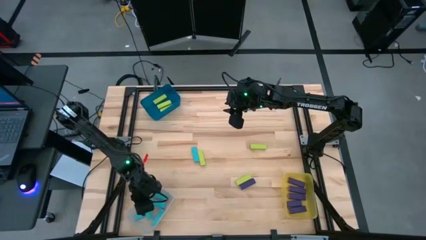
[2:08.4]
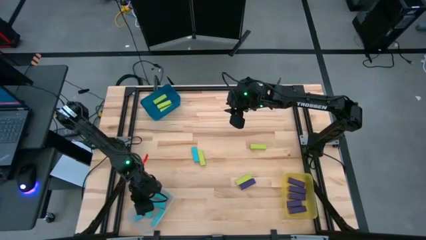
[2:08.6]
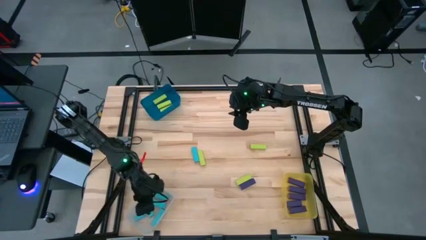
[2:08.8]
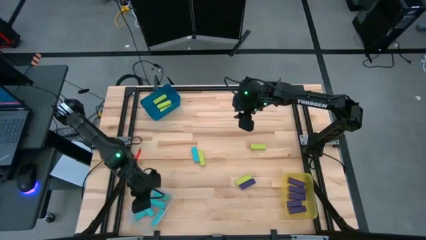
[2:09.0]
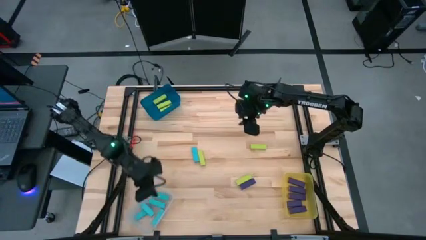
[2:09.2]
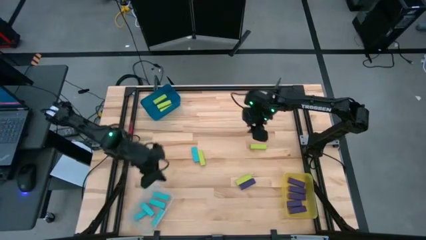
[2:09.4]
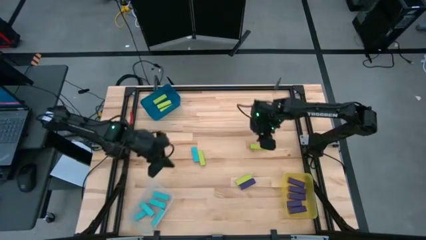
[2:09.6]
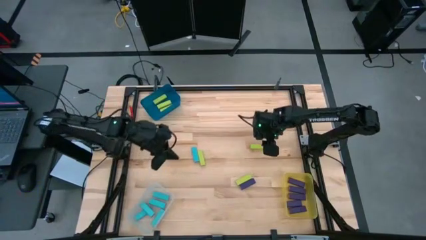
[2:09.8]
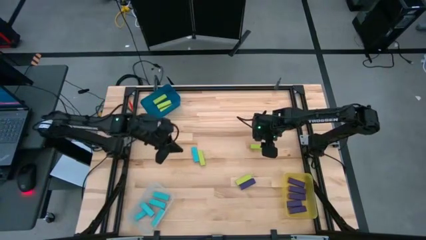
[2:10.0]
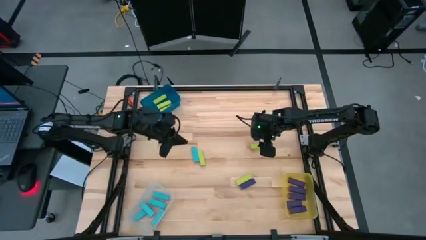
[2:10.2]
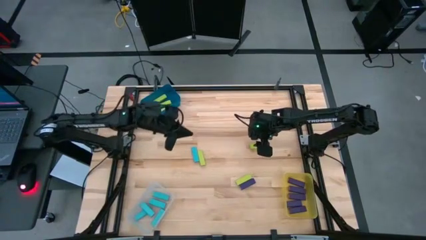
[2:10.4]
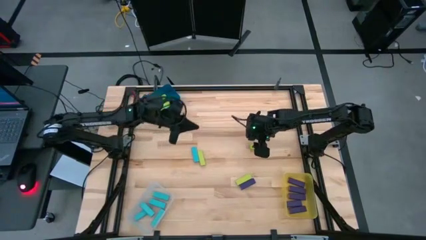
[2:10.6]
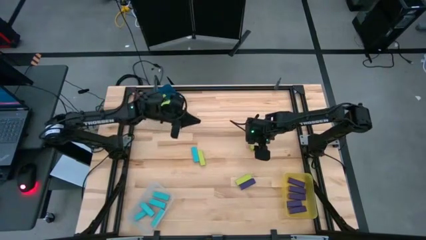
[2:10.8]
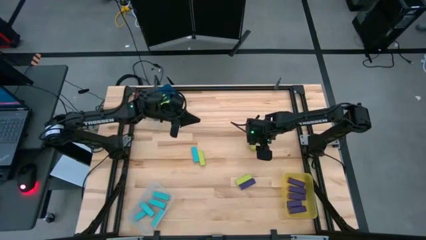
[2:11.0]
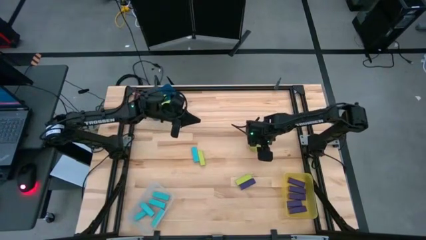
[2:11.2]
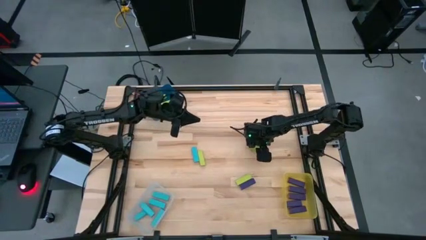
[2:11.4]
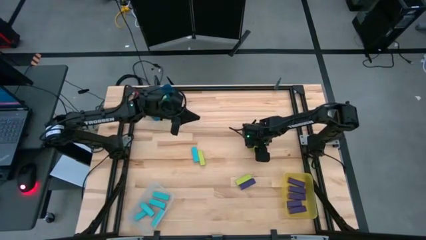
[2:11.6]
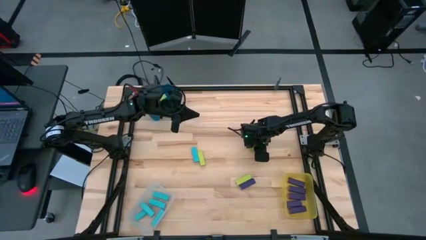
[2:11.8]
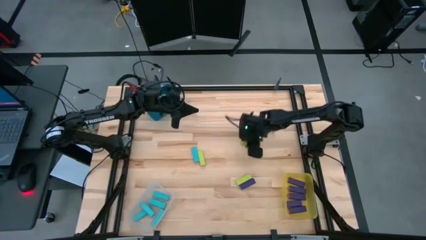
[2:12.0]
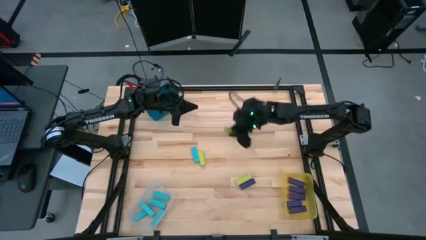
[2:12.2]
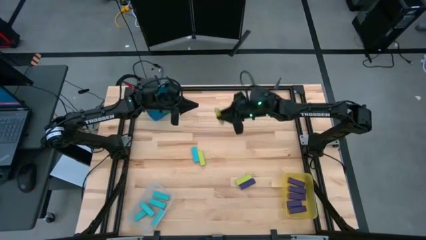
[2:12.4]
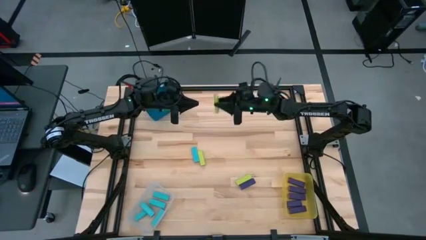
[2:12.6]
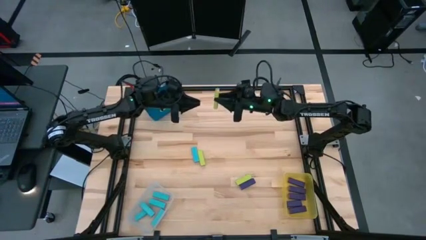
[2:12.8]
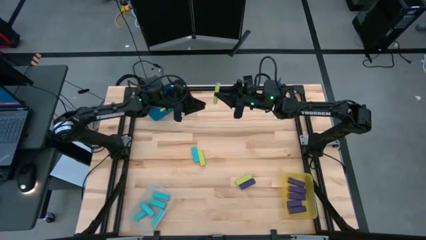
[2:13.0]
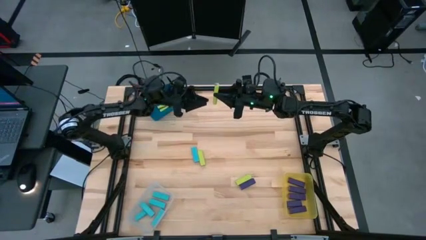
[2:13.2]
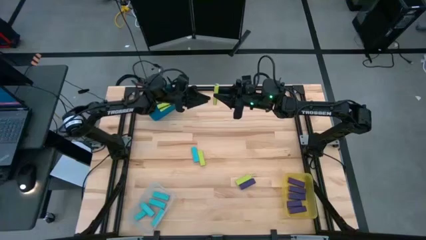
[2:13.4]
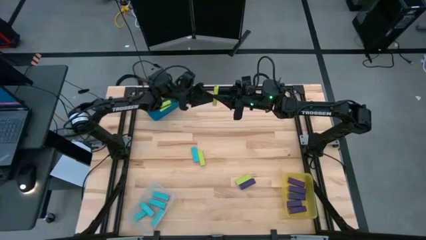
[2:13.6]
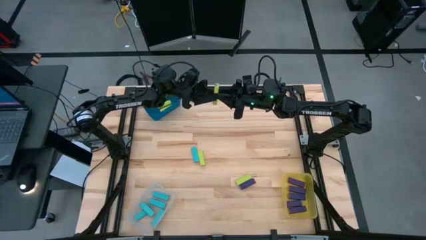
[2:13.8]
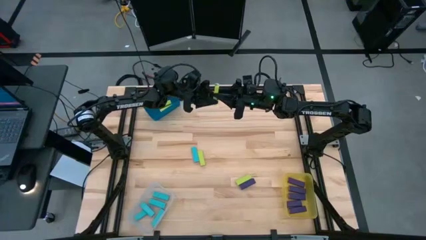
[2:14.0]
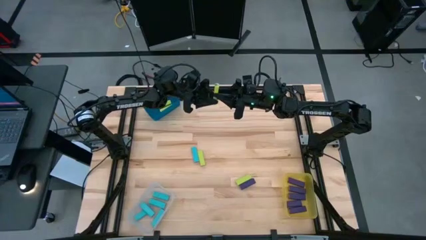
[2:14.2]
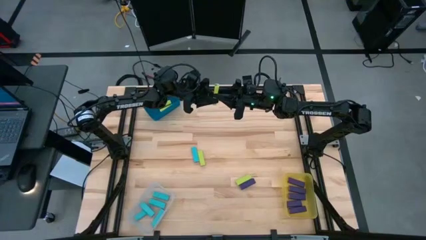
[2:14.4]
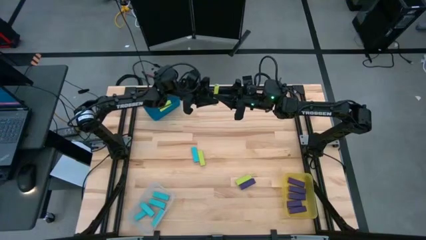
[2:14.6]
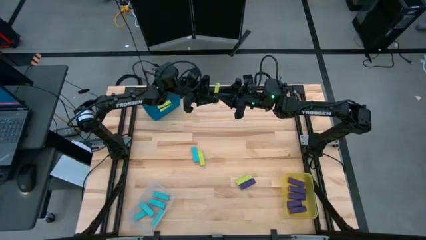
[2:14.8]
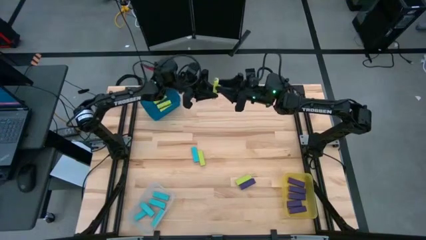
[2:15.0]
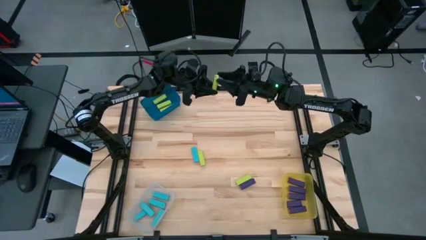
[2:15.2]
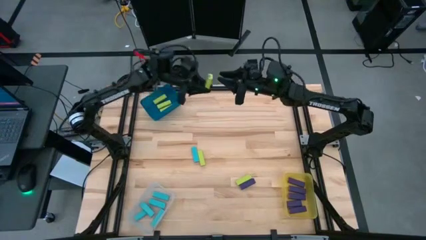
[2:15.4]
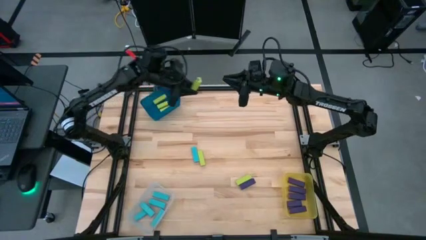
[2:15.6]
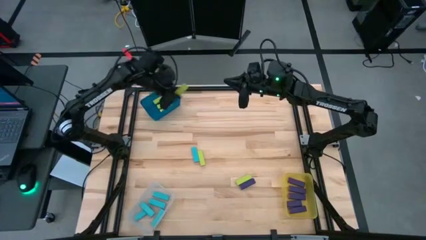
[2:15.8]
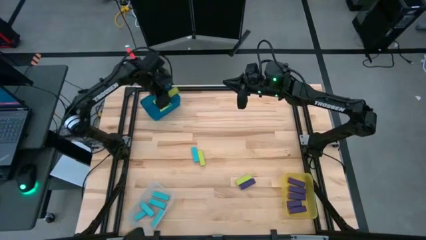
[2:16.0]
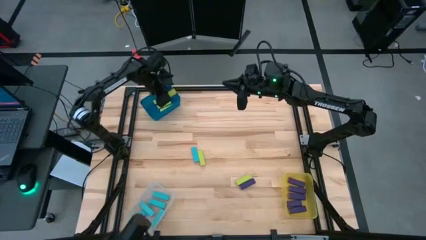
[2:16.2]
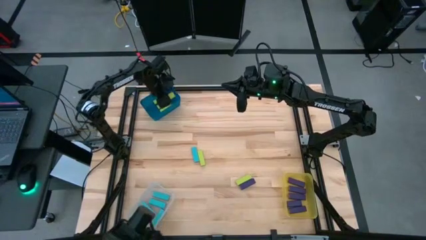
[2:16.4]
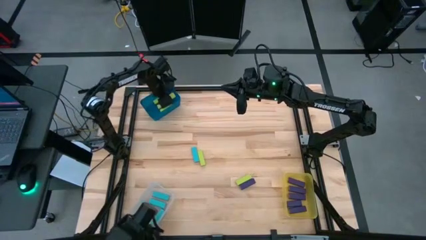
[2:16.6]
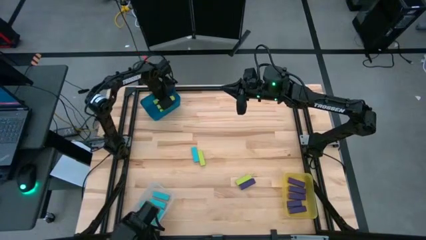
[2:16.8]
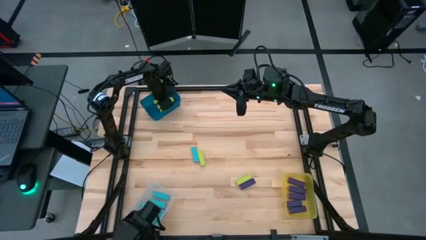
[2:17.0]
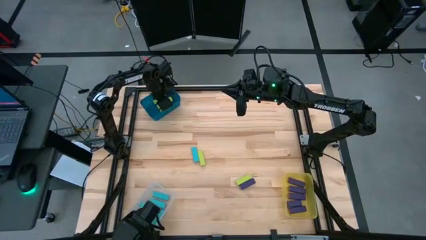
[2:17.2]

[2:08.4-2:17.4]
Task: Sort blocks
Put the green block into the blue bin

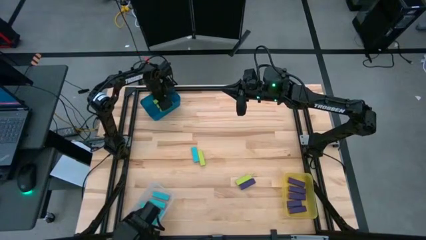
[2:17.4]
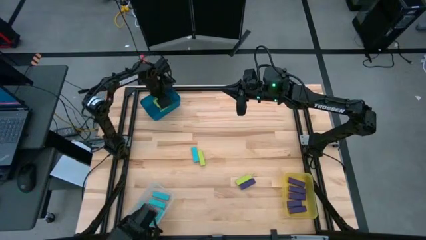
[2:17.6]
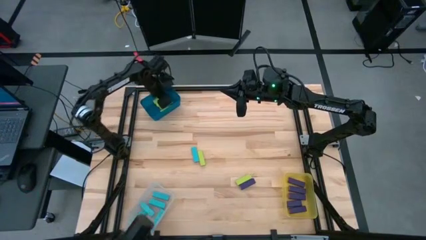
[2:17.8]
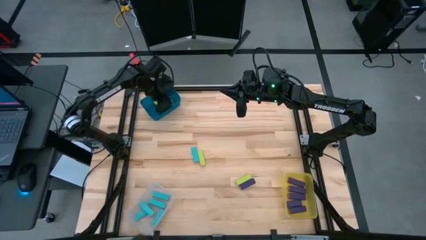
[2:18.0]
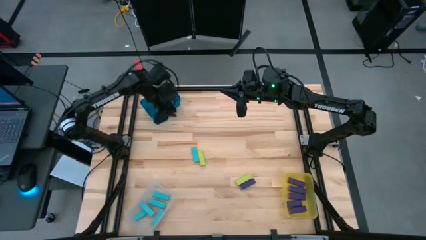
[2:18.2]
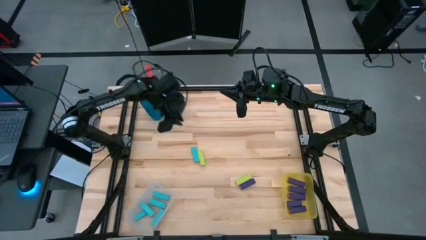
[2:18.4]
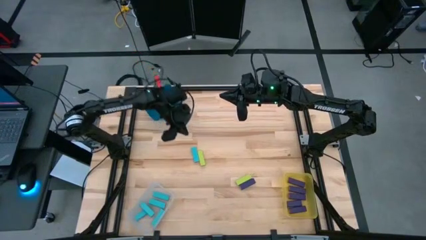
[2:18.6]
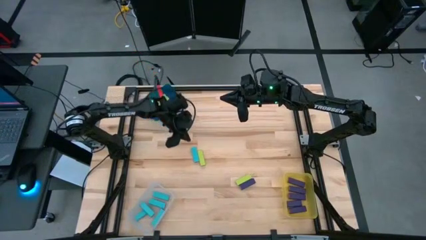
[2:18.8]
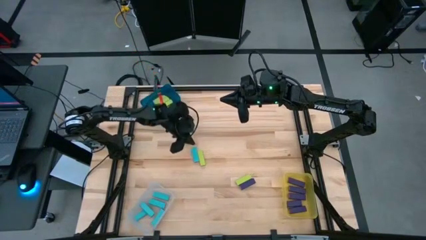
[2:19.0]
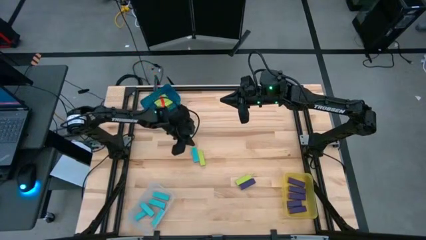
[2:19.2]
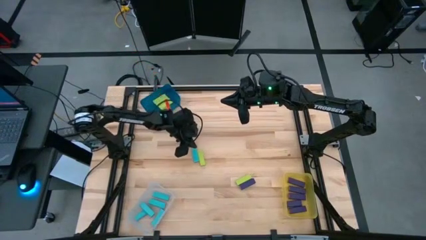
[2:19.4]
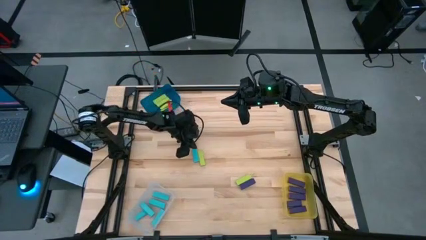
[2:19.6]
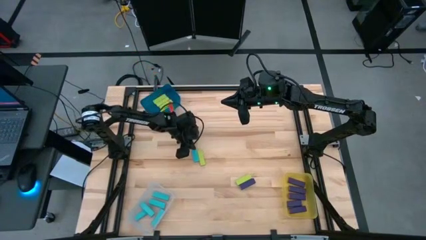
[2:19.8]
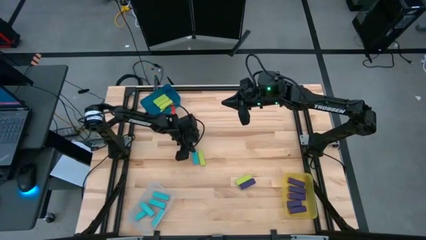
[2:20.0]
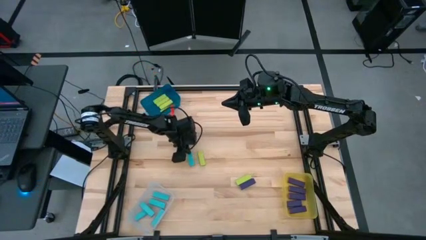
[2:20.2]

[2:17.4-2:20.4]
Adjust the blue block

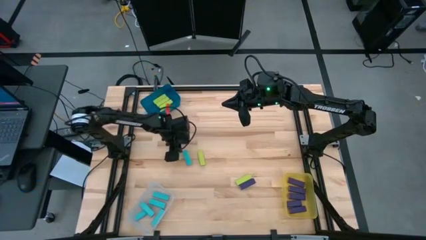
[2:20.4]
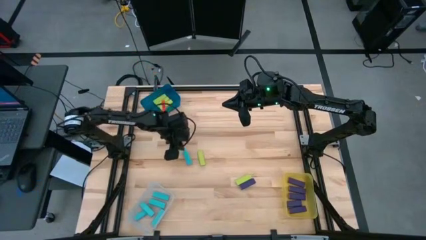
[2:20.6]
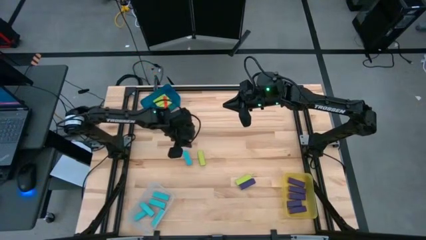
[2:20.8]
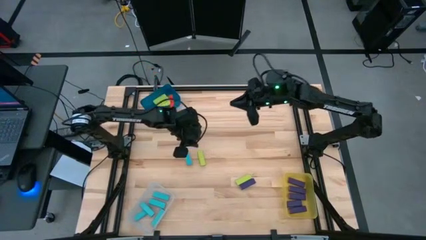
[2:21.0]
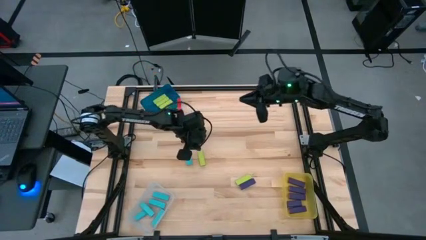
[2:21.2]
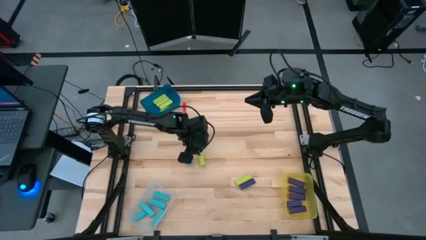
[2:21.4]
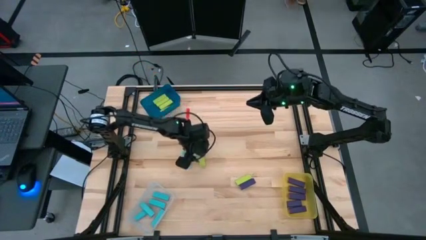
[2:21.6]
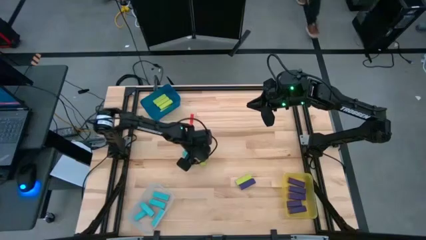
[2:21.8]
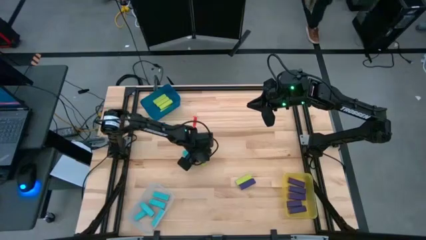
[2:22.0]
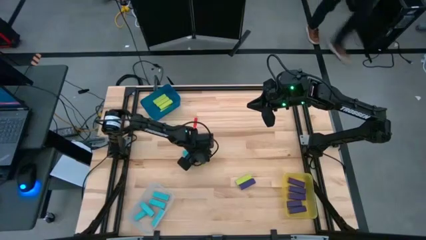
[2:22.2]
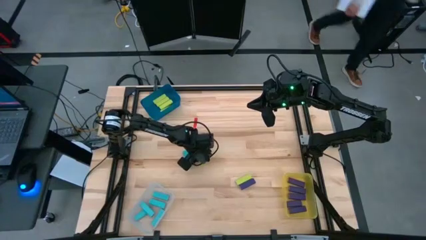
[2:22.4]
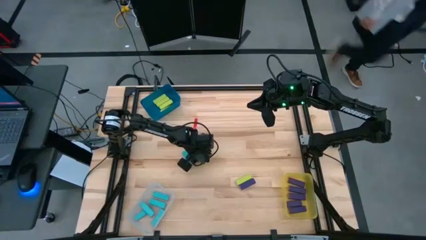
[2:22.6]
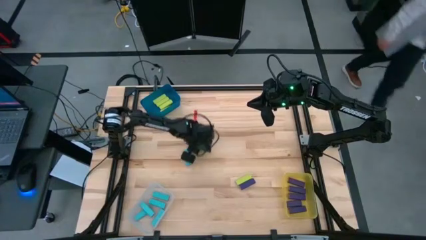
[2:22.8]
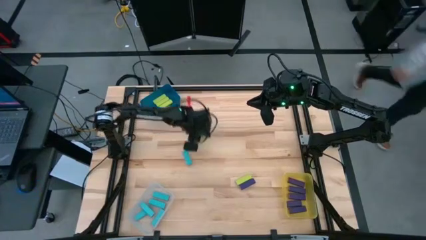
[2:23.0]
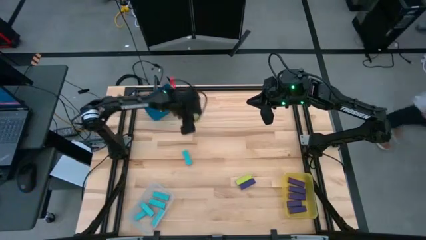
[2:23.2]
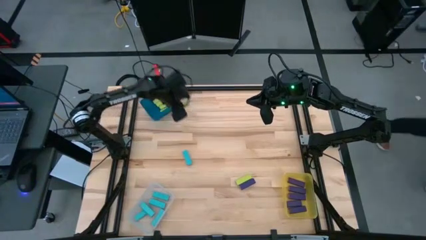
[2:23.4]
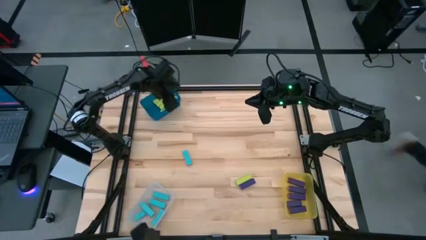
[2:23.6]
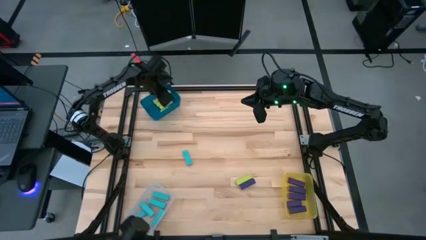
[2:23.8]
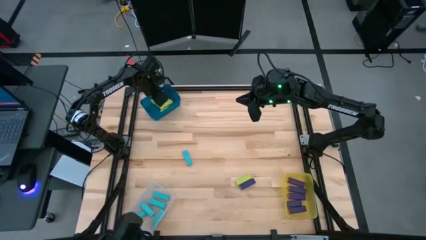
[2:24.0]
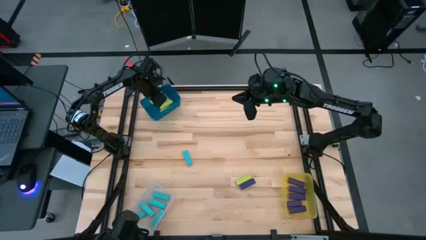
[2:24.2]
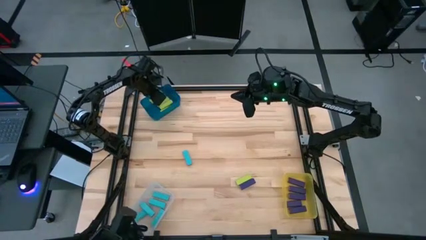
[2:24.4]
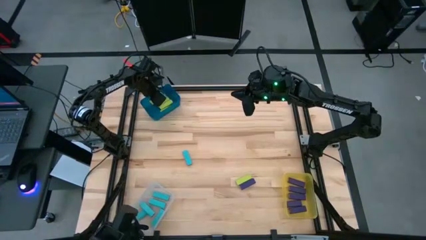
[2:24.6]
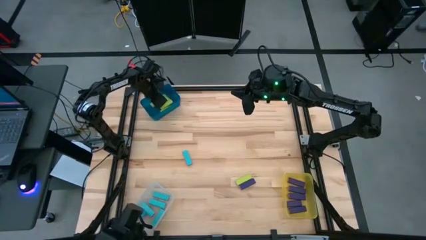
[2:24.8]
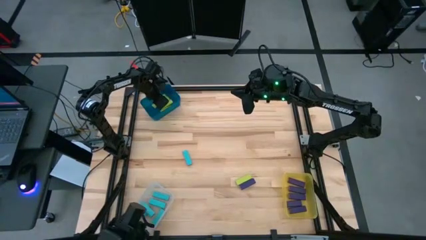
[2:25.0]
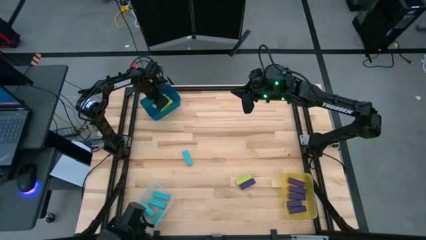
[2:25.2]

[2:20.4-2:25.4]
Put the green block into the blue bin
